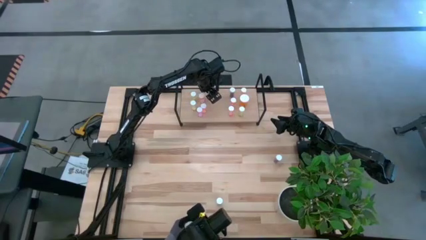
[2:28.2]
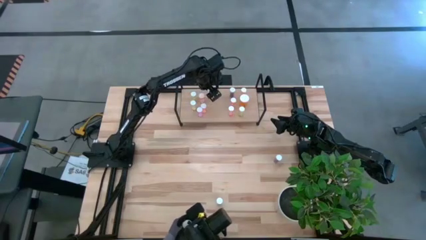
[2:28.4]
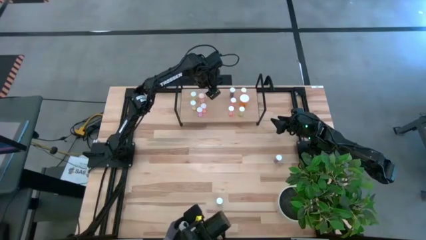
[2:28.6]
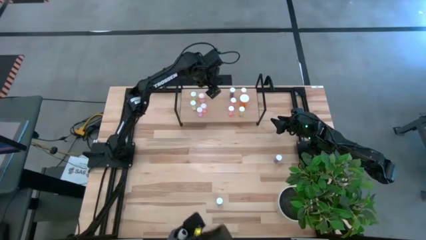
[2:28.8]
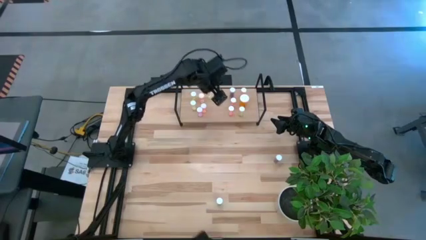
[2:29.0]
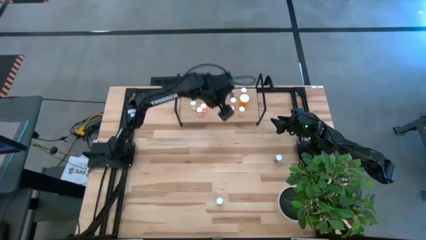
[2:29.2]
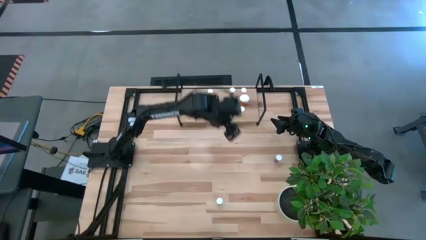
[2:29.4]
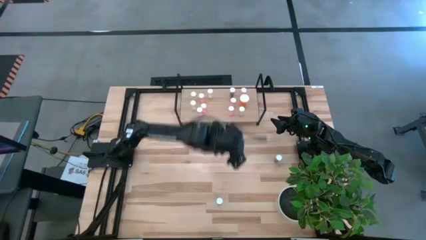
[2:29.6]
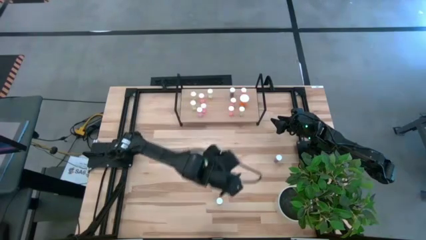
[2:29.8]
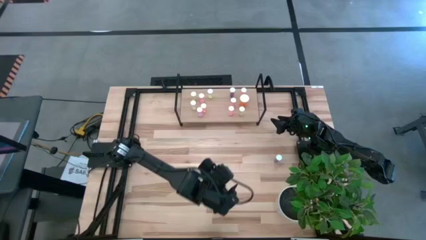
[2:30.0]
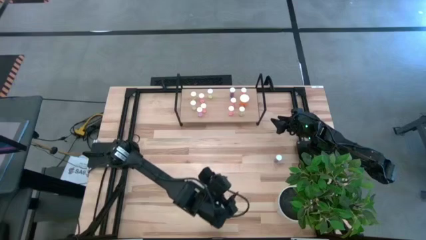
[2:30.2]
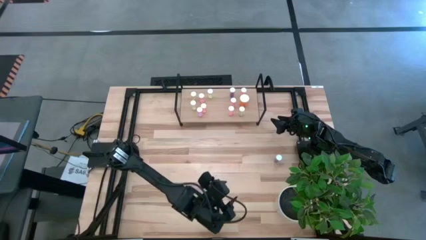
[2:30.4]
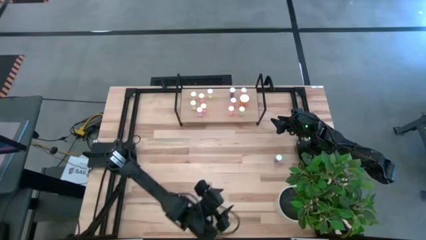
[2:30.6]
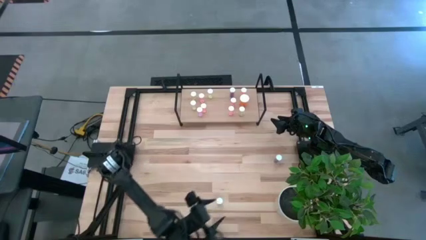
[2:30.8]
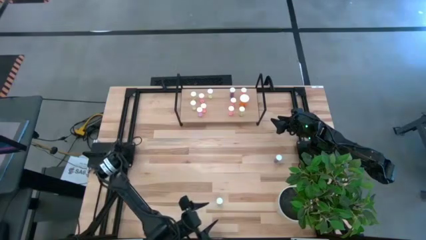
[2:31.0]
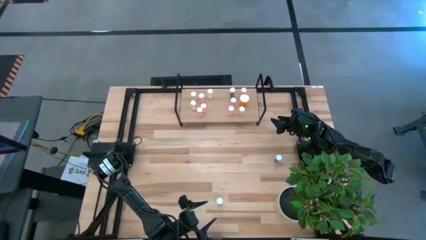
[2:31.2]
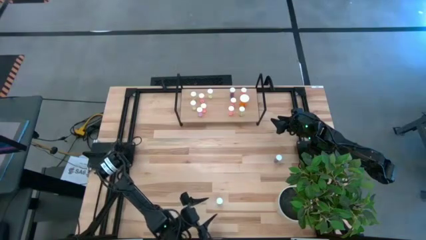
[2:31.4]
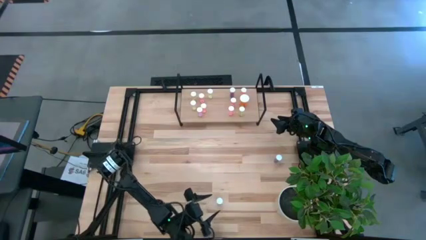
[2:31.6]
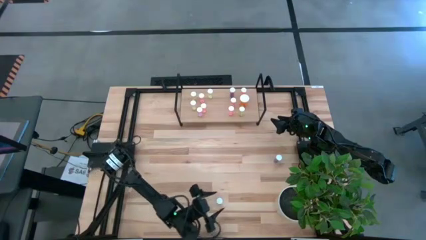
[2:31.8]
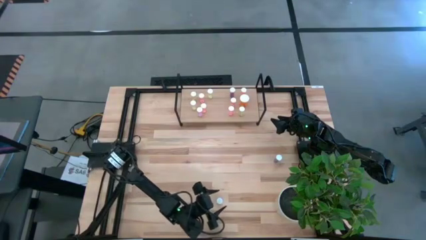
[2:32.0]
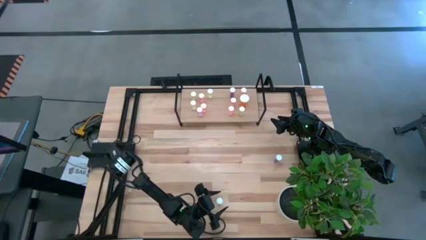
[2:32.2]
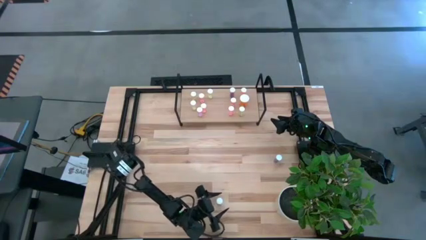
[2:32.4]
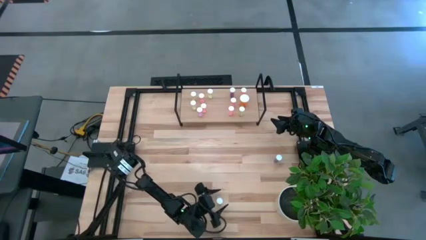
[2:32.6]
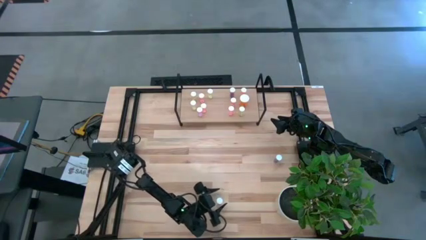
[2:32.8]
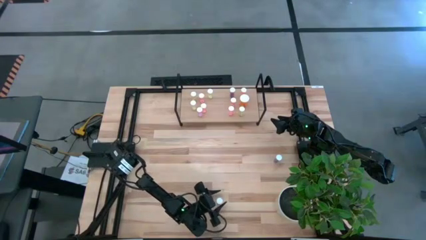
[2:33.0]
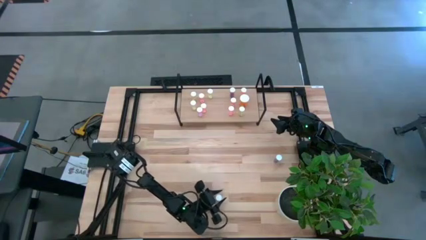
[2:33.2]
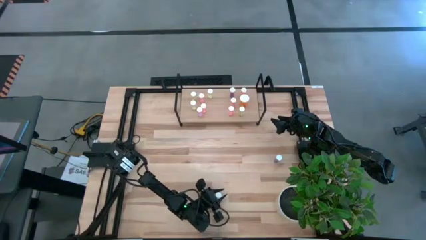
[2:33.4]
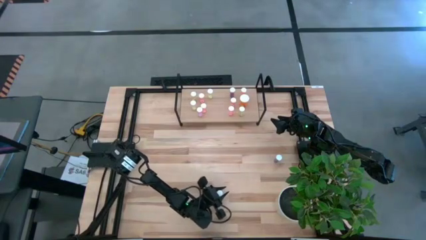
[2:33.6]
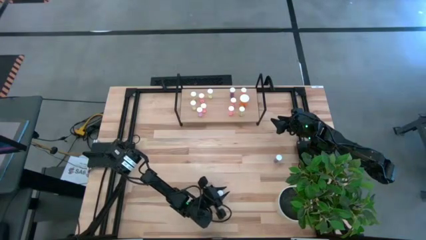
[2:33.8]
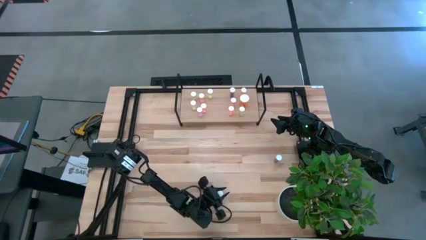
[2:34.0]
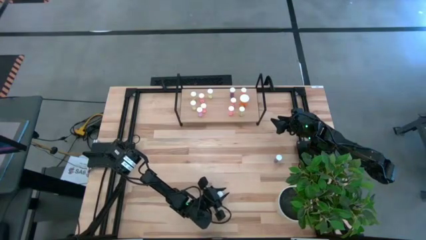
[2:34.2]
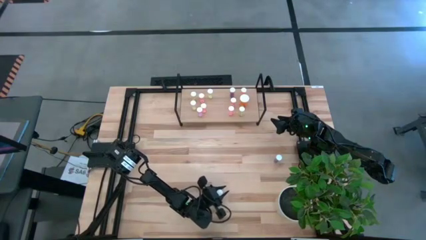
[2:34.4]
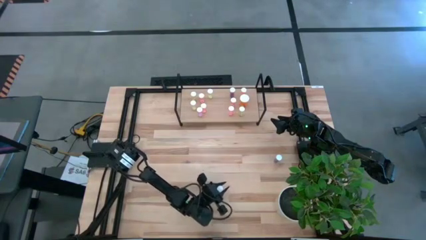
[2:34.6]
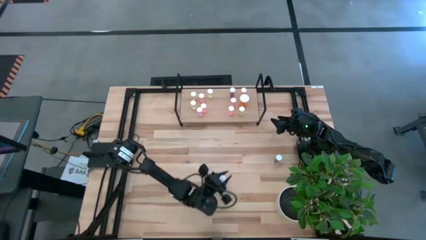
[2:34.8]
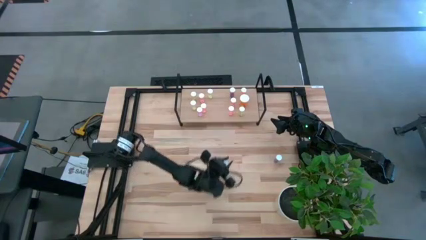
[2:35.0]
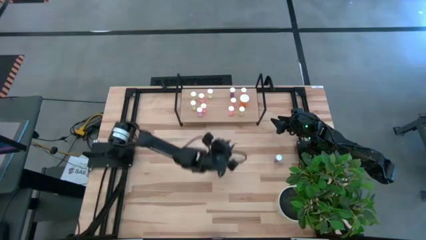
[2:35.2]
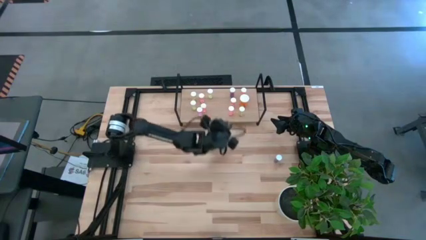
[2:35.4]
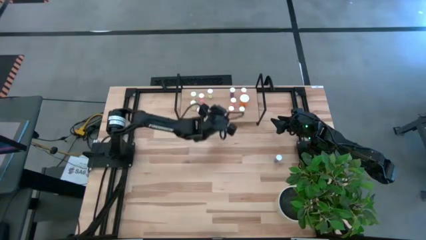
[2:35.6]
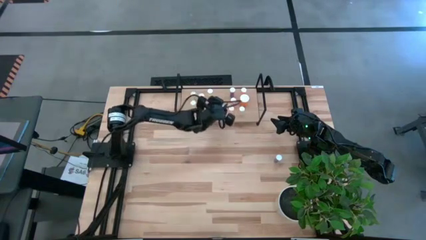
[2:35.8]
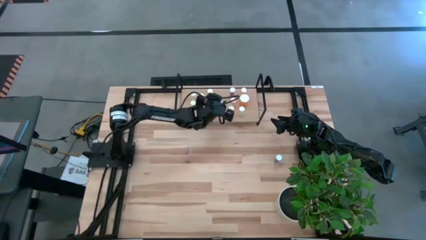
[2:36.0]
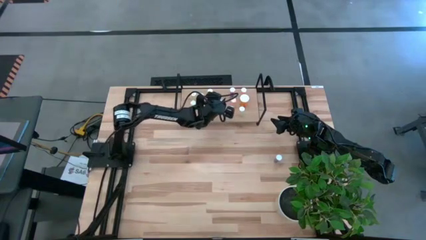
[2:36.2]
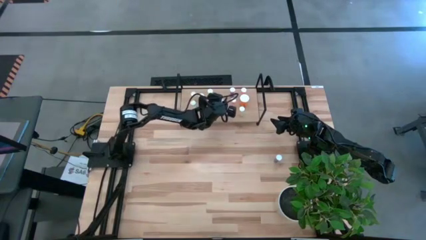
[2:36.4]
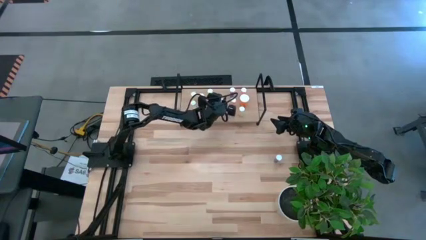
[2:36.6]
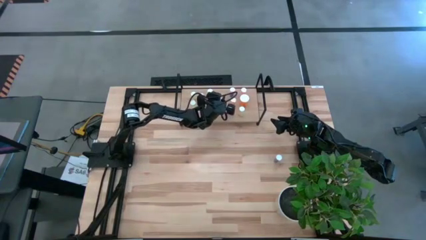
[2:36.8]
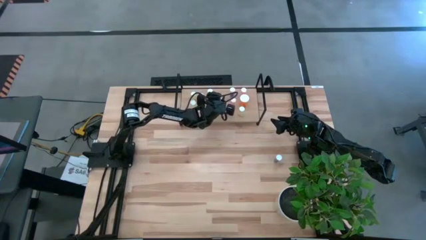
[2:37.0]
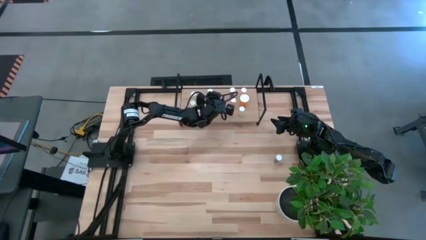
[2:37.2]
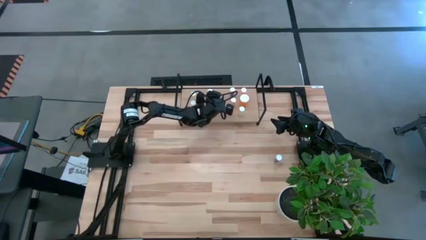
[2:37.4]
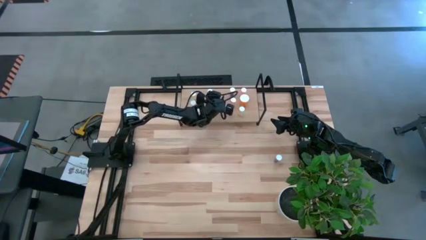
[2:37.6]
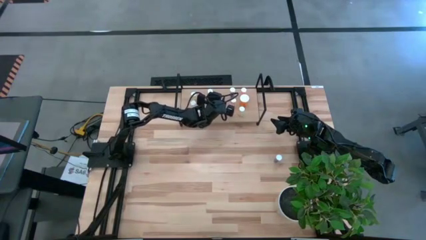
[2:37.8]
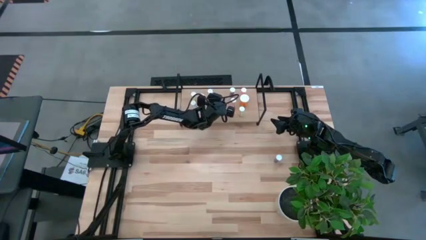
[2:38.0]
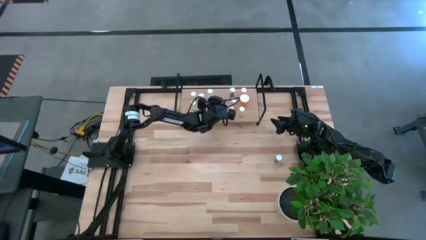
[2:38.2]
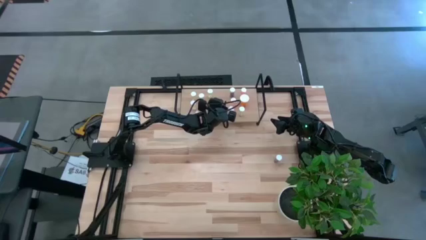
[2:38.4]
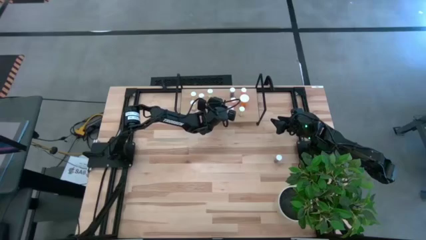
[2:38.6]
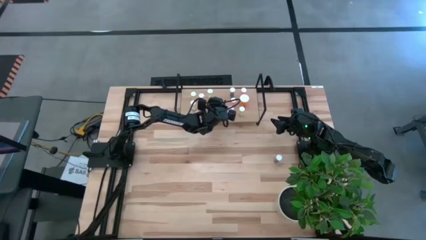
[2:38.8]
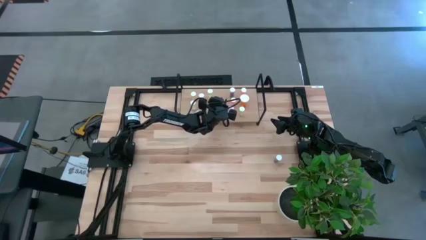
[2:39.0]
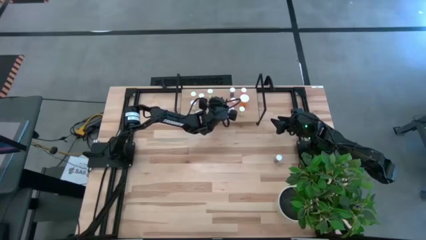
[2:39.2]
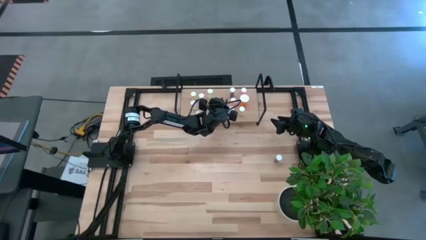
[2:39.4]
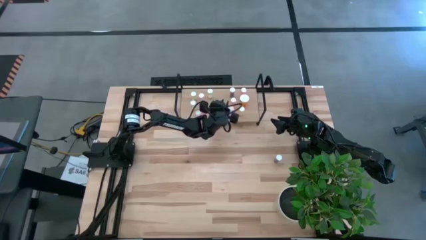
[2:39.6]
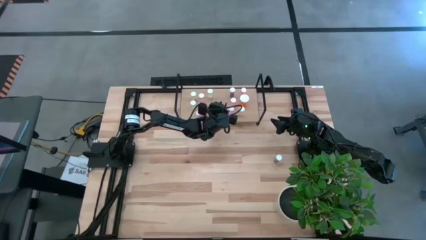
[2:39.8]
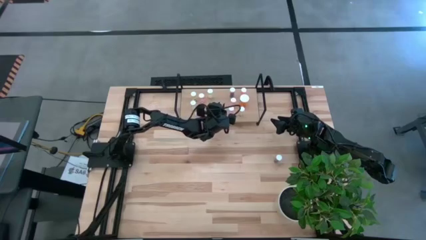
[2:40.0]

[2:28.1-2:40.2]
Task: Pick and place medicine bottles onto shelf by color
Put the blue pill bottle on the shelf

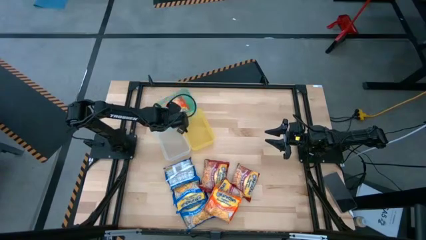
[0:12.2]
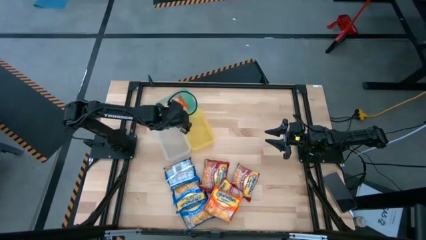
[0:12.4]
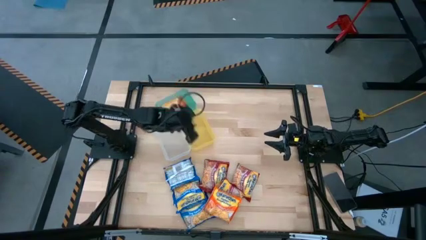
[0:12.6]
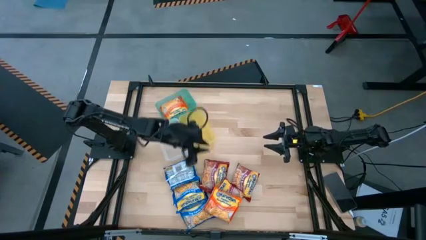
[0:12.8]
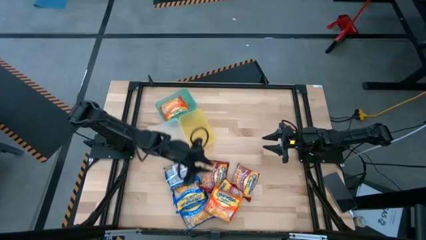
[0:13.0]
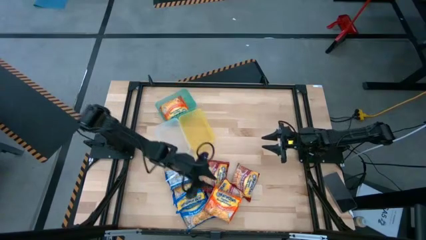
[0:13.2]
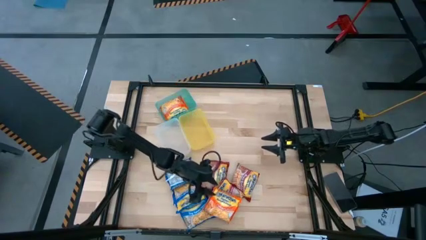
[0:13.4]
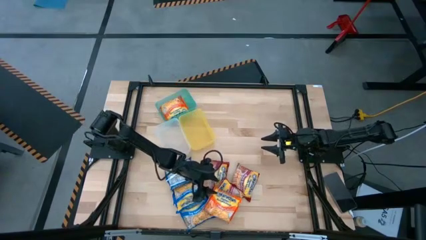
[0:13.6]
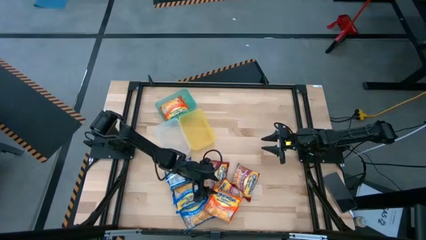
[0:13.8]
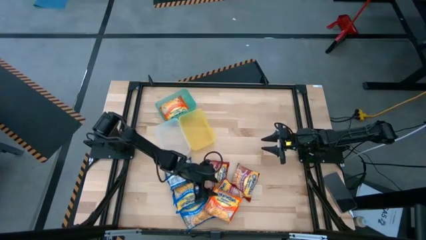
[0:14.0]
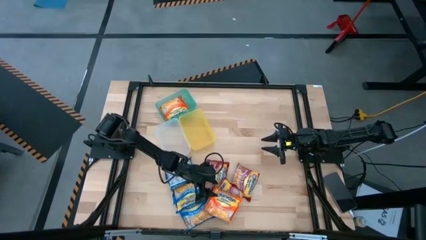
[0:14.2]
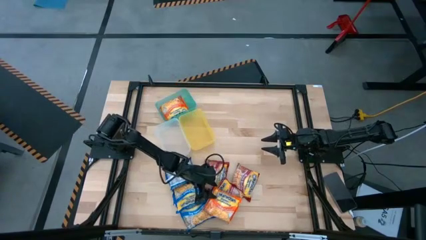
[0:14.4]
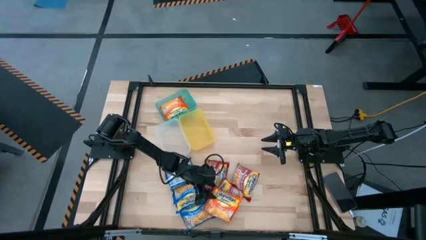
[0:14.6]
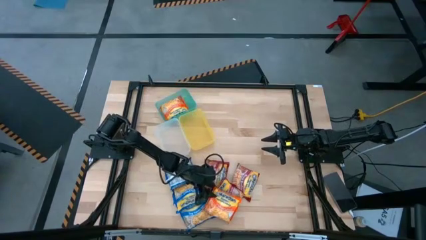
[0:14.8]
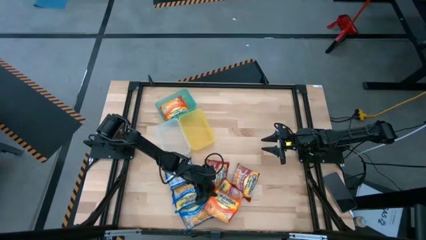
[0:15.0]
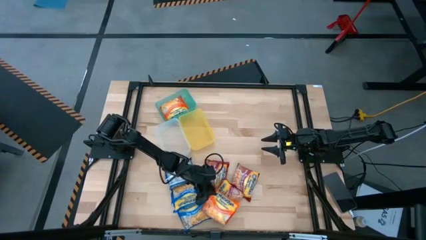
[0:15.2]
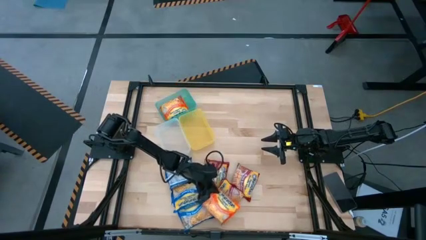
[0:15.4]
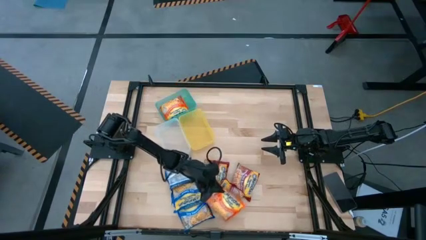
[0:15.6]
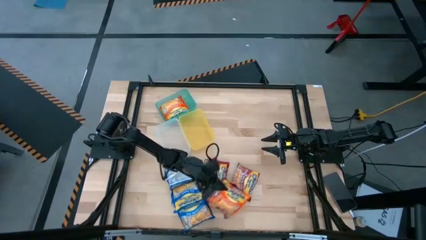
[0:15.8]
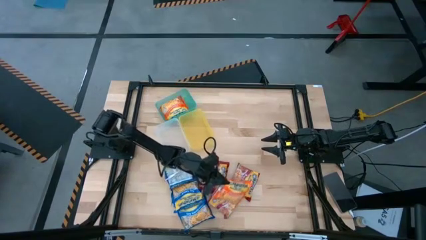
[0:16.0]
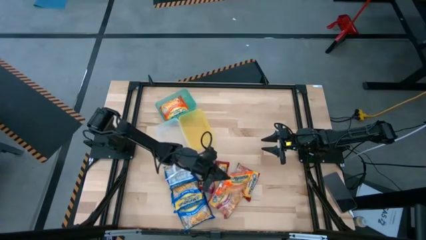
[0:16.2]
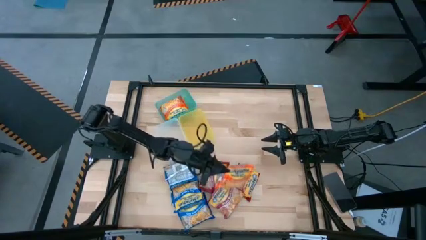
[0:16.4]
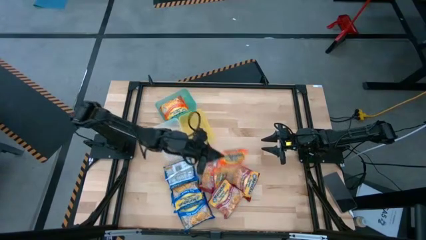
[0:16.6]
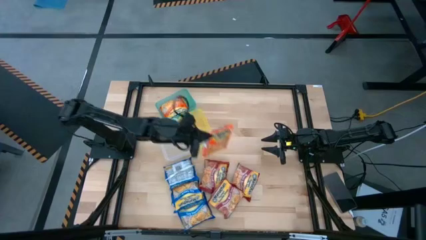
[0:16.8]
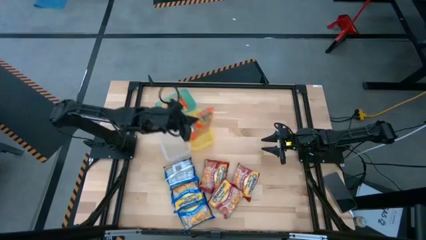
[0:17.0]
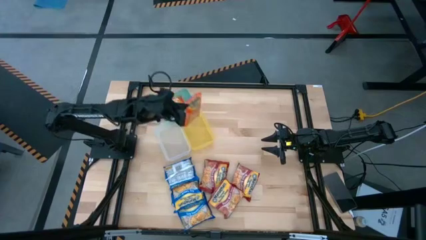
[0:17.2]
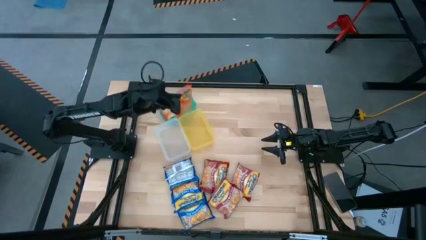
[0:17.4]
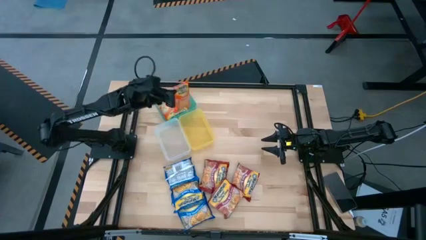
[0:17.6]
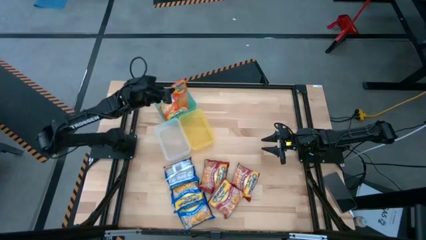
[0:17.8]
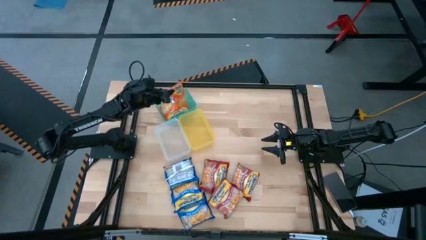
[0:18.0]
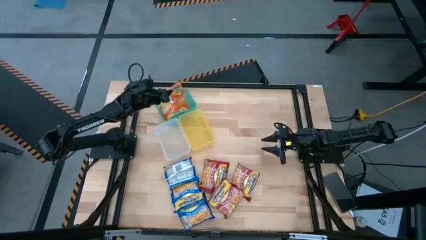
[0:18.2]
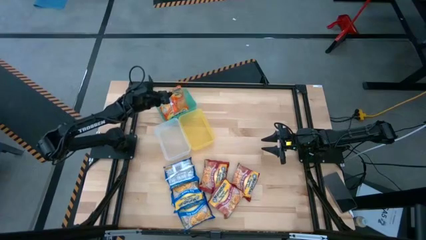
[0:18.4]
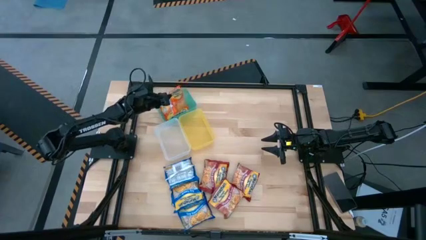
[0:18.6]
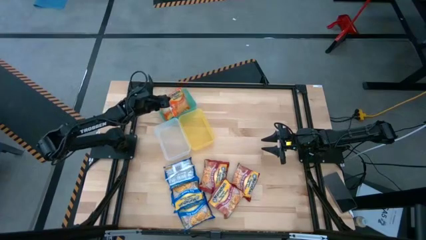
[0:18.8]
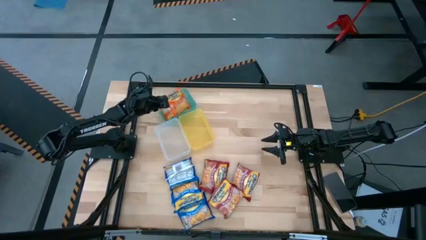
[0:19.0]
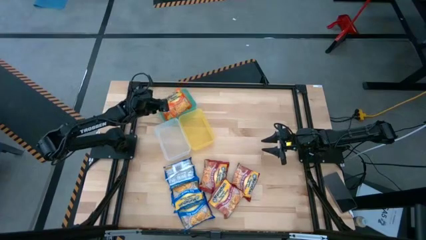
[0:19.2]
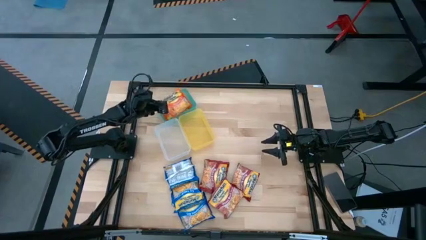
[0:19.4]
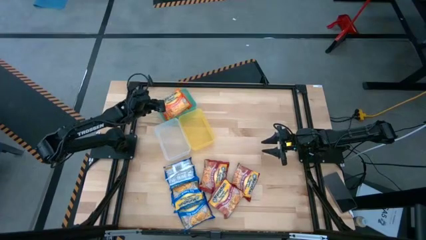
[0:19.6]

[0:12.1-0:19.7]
Task: Sort Maruchan noodles
Put the bottom orange noodle pack into the blue bin
